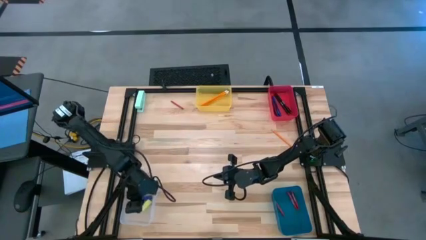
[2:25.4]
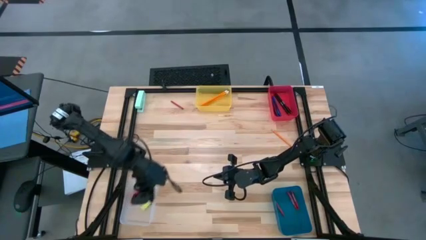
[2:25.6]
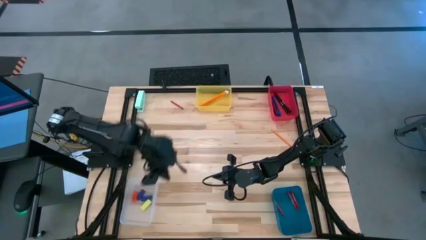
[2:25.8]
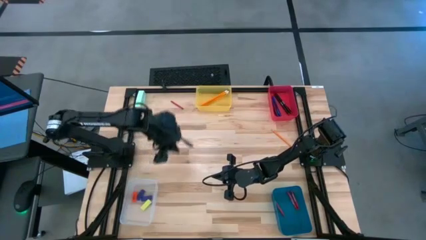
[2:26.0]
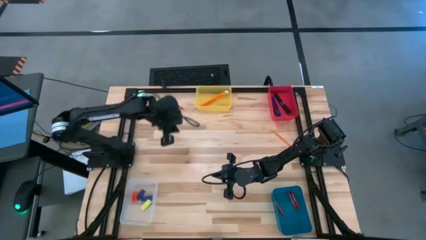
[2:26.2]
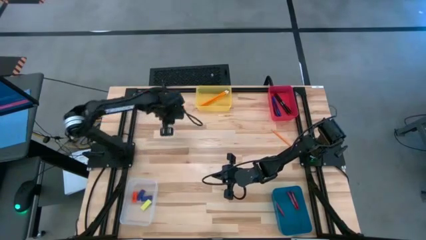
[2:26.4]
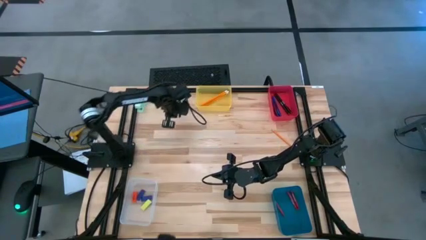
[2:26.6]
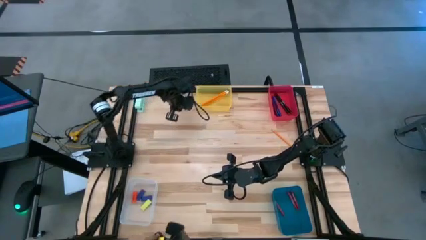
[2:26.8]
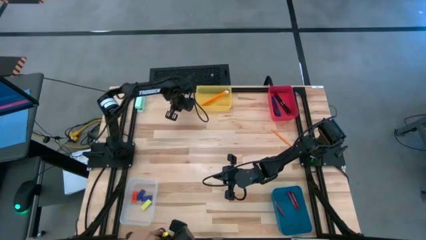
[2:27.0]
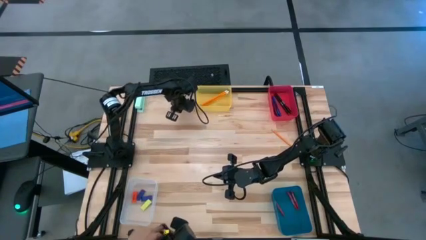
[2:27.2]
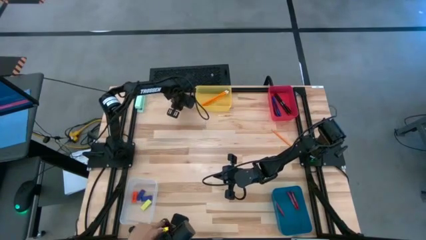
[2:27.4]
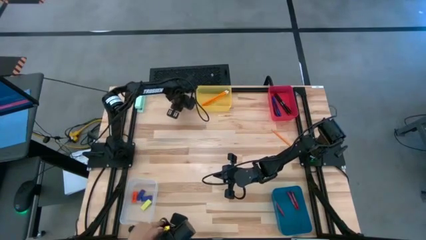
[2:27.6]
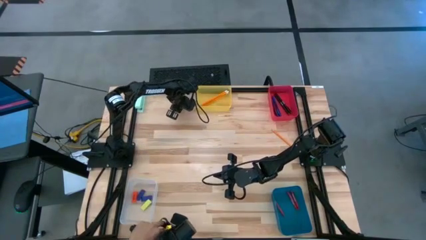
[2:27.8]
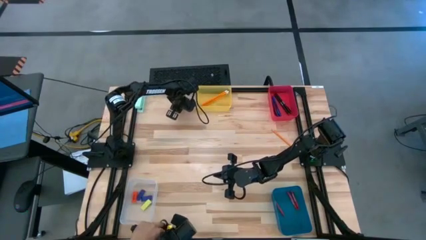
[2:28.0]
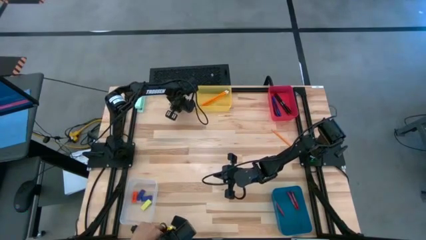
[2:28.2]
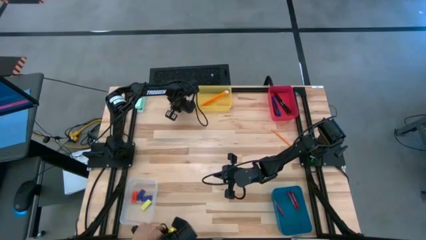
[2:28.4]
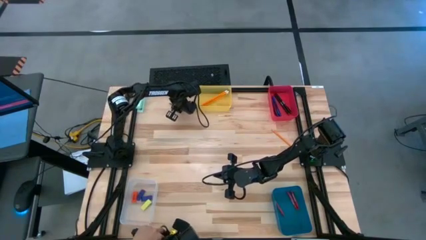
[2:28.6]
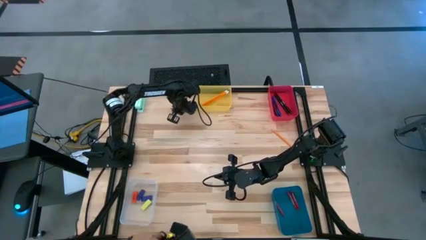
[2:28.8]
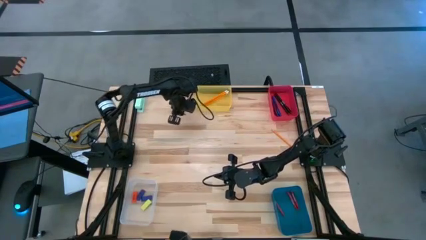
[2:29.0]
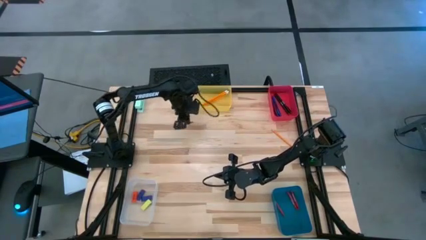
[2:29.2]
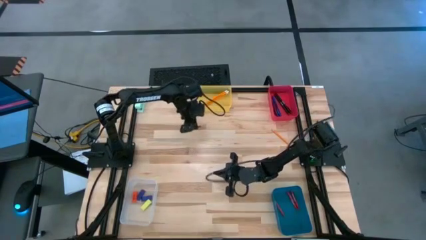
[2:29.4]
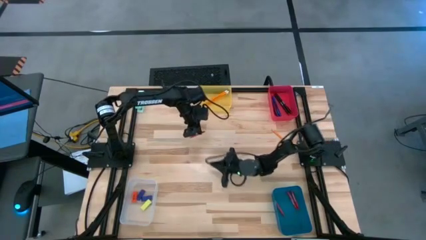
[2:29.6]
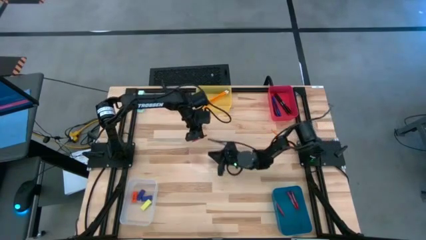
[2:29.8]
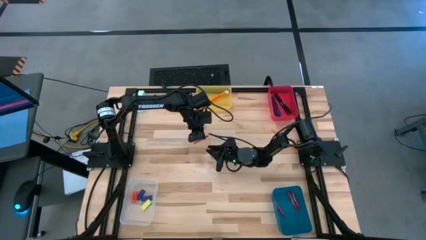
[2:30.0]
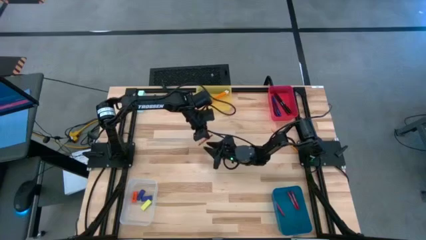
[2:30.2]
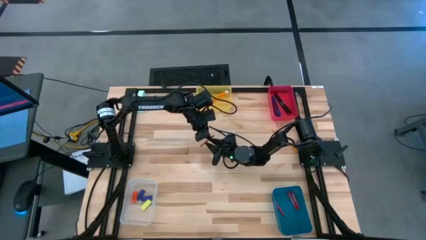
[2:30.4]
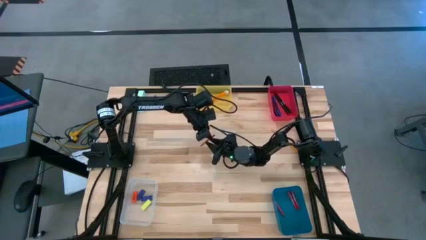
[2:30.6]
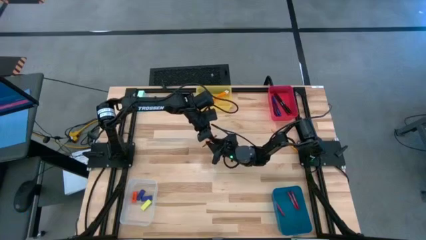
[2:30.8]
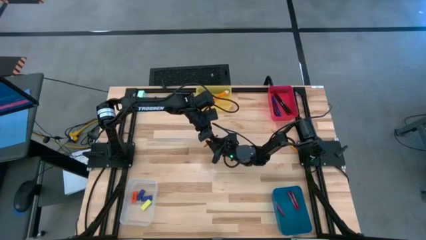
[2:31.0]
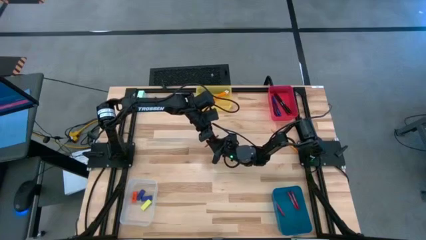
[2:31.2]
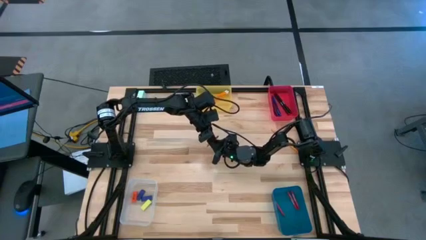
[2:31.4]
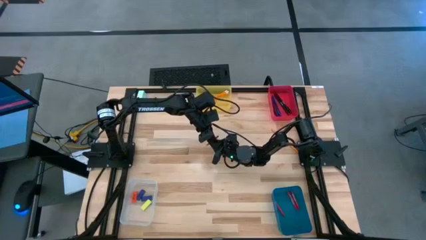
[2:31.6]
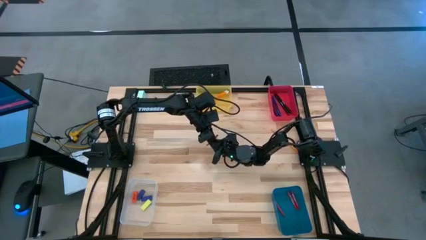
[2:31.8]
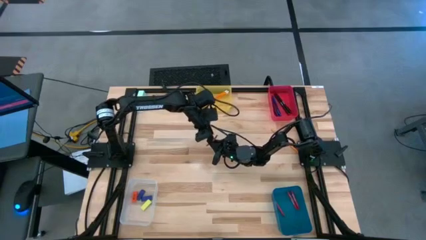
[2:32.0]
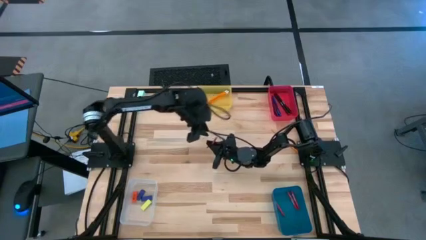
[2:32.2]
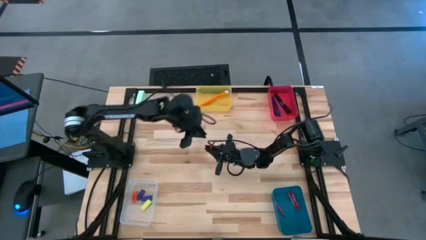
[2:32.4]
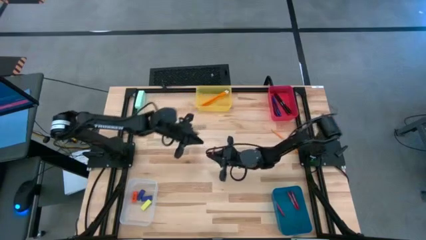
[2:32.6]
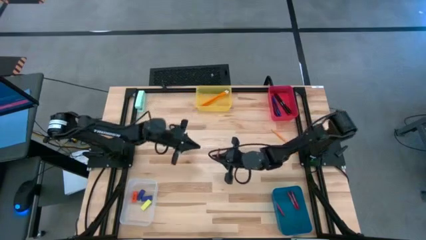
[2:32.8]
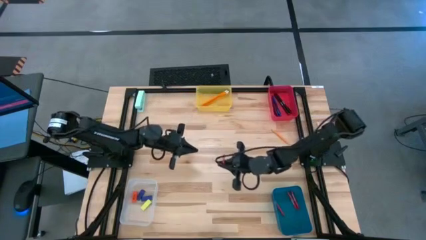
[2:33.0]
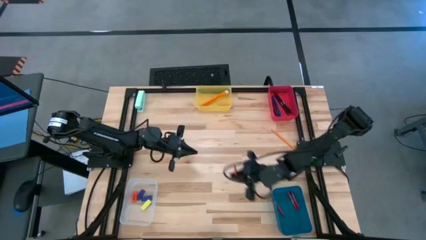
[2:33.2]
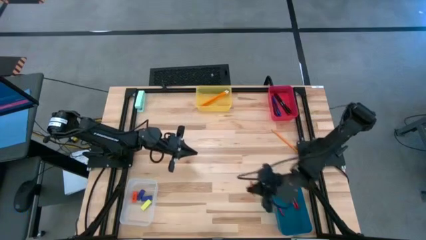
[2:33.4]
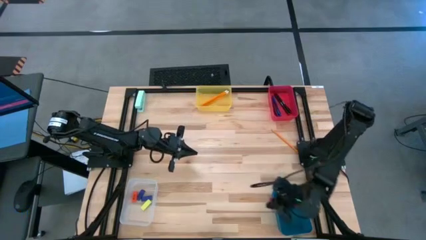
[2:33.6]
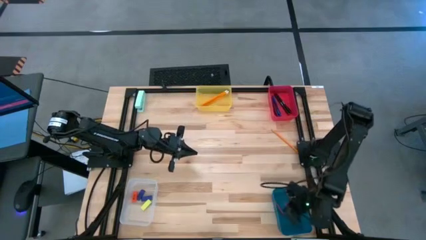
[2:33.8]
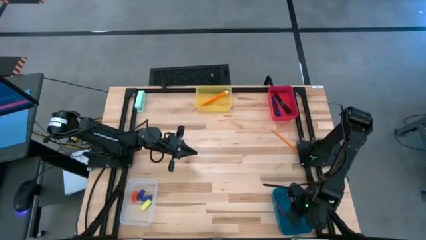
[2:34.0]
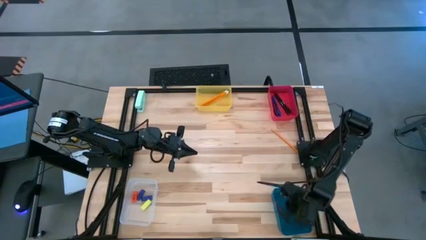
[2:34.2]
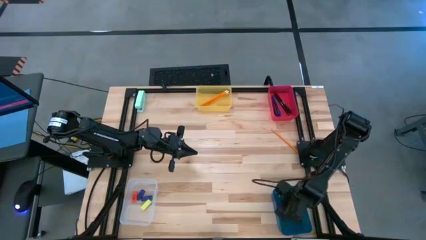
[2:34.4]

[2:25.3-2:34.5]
Task: Sort crayons/erasers/pens/pencils in bins
Put the red crayon into the blue bin

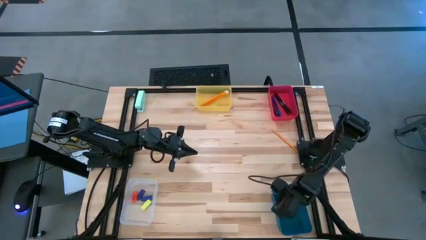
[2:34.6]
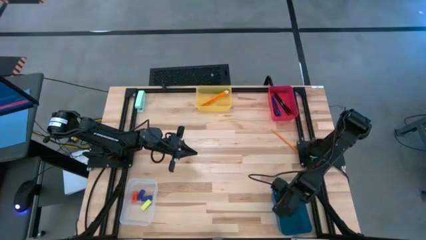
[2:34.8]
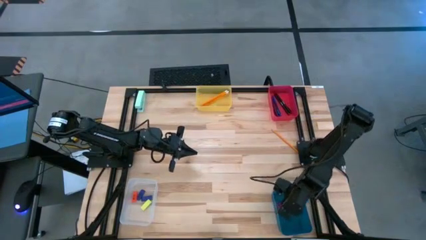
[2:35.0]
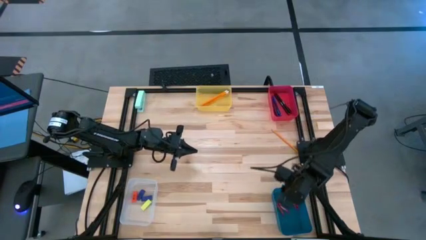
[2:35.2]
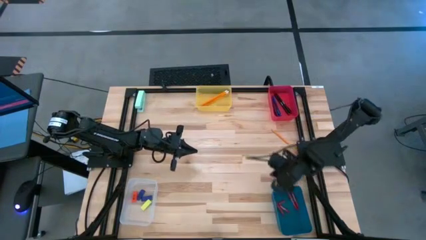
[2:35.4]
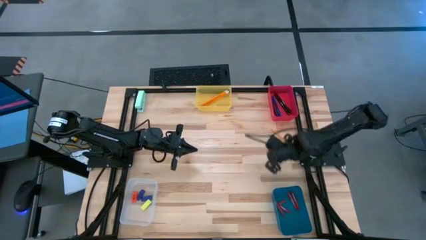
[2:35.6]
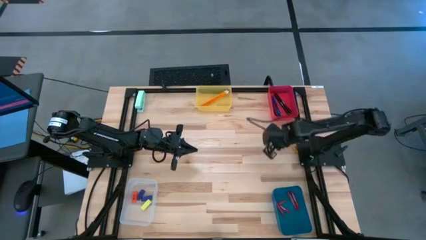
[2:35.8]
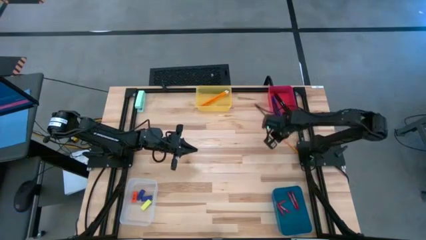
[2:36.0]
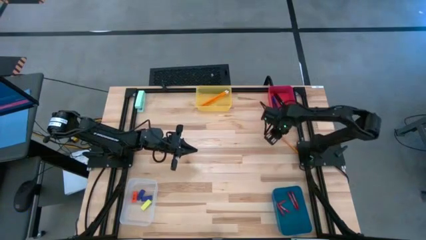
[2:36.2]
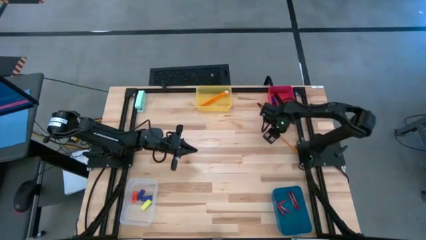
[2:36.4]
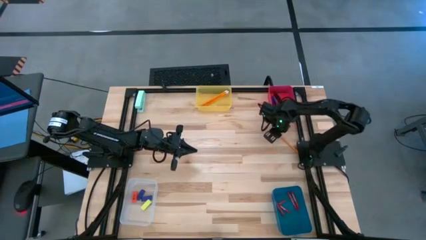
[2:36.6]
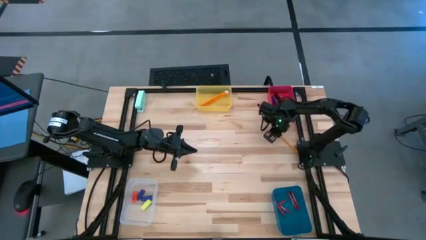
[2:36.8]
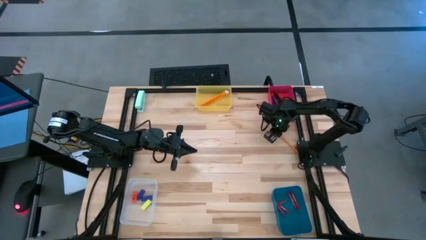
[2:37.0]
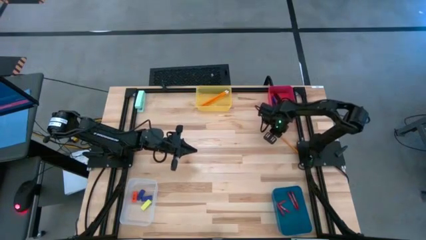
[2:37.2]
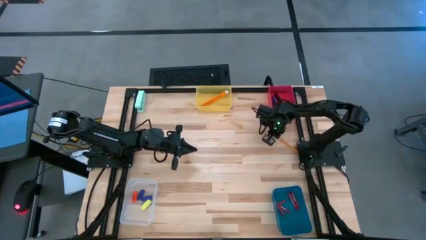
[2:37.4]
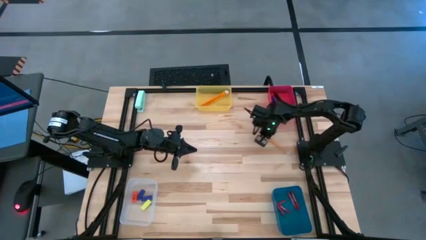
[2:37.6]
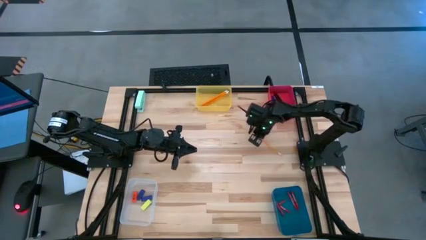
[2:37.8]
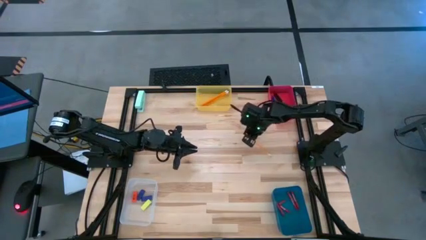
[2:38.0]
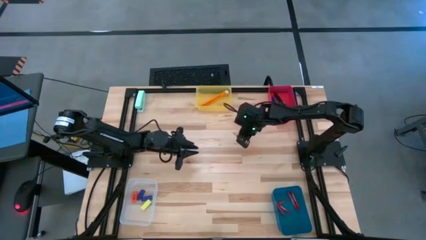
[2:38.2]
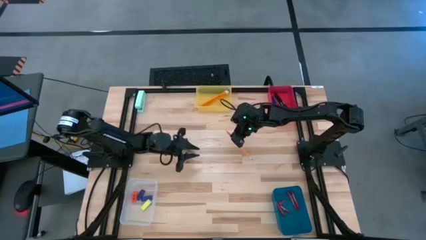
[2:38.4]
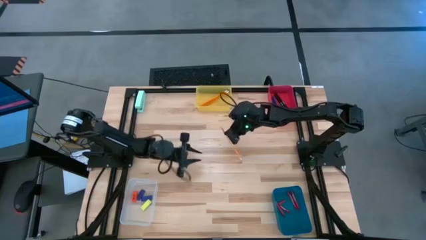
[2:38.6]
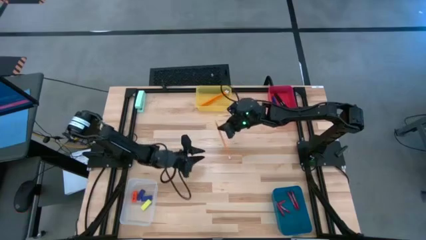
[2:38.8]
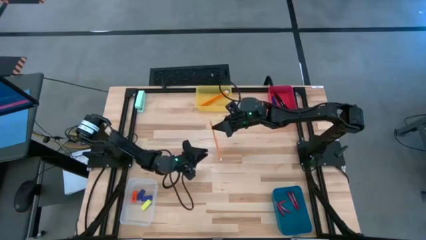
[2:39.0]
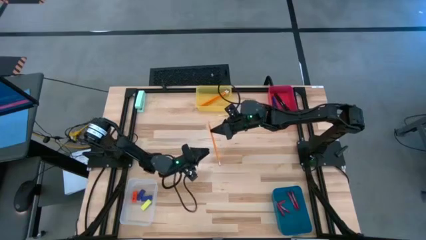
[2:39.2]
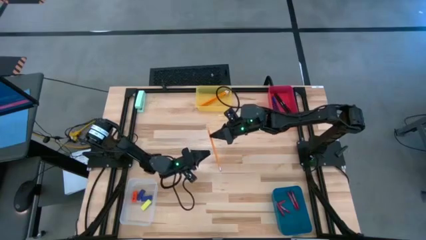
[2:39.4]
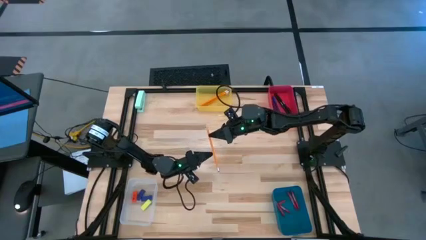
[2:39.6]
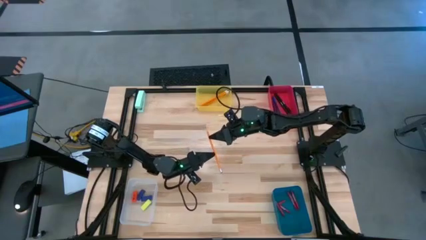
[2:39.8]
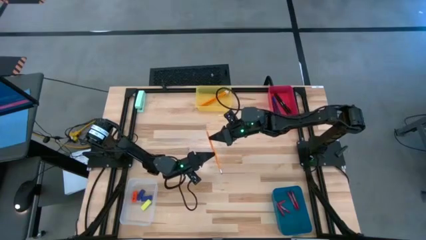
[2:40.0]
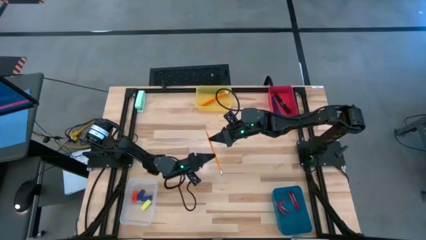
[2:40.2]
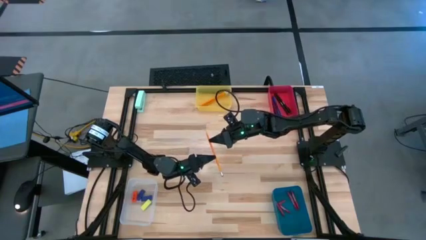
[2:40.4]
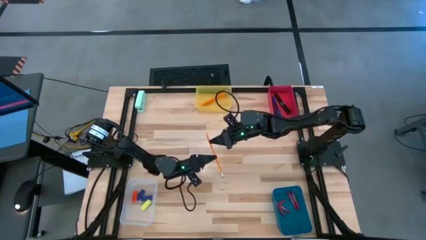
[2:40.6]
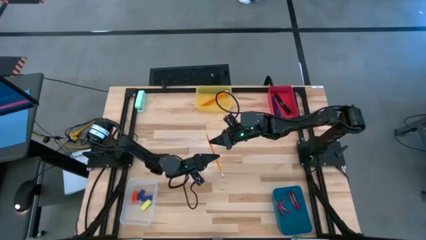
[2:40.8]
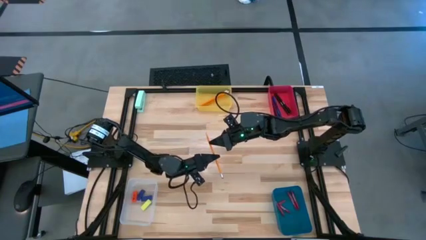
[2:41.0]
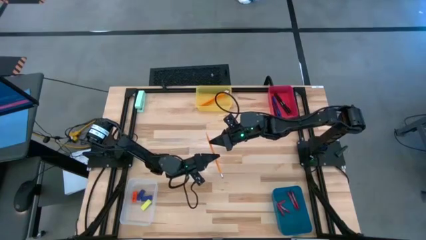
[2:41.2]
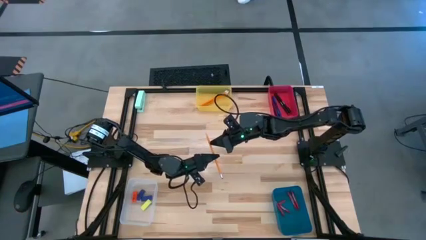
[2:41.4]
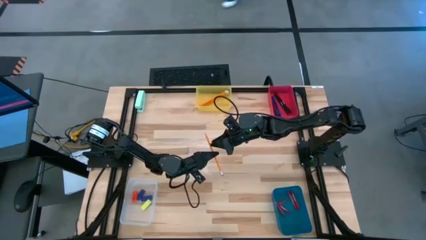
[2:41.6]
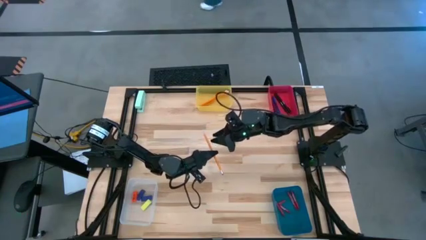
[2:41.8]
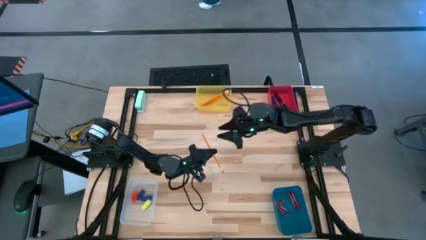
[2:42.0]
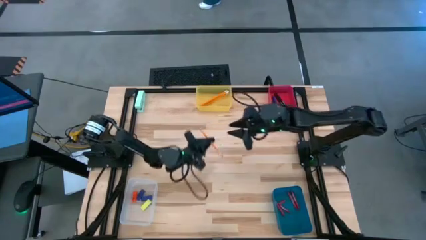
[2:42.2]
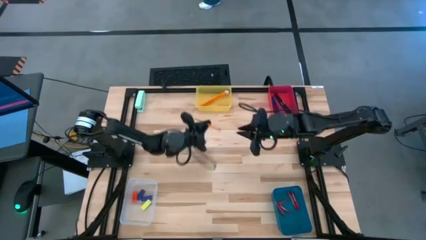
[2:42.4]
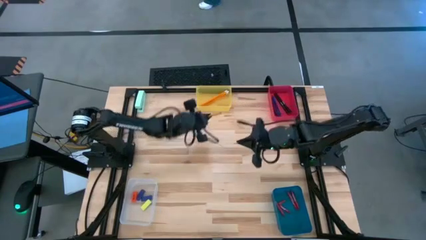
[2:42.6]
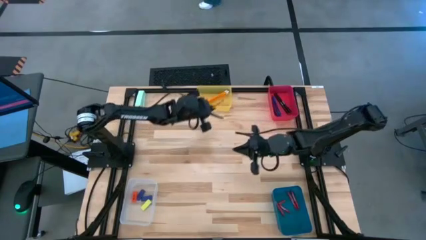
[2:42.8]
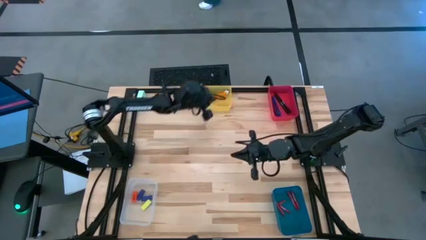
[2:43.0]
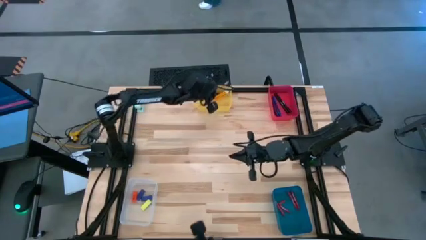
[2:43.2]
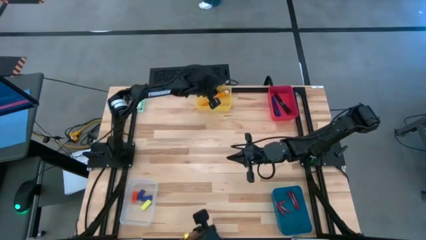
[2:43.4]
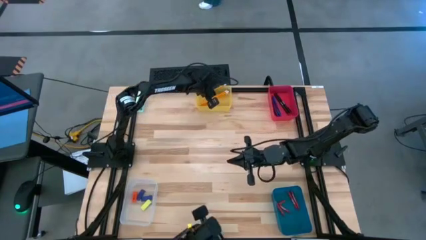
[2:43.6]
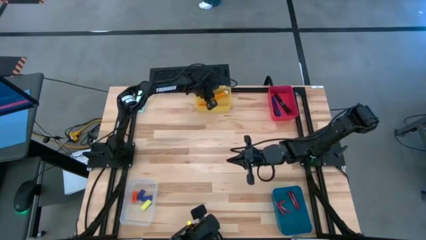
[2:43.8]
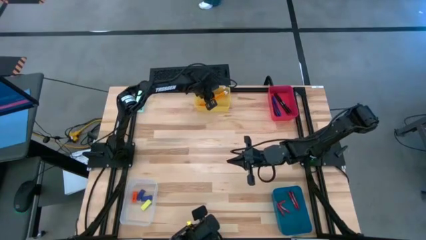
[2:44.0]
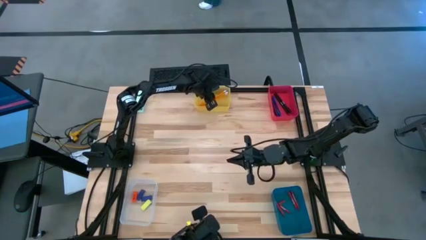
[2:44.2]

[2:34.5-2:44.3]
Put the orange pencil into the yellow bin
